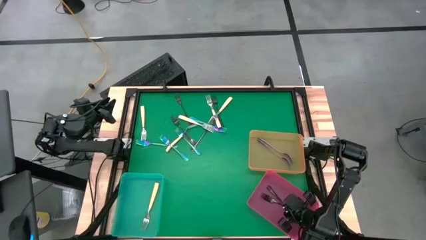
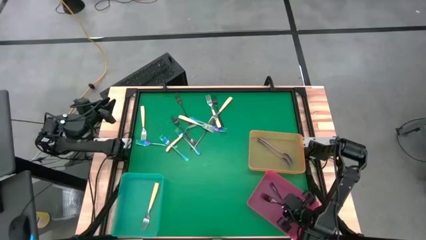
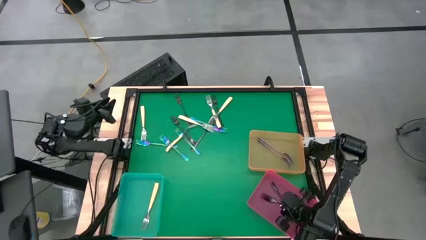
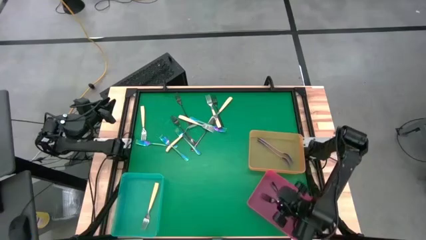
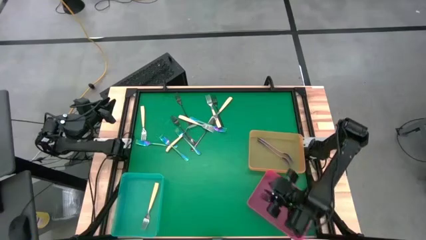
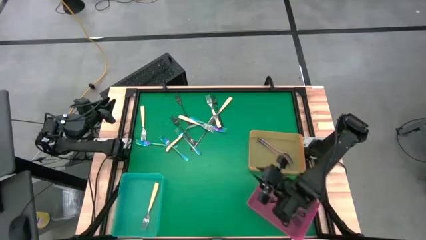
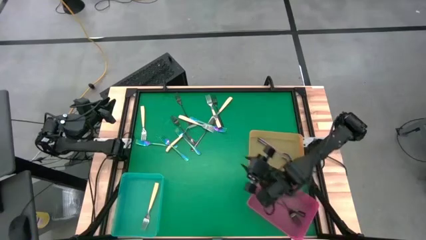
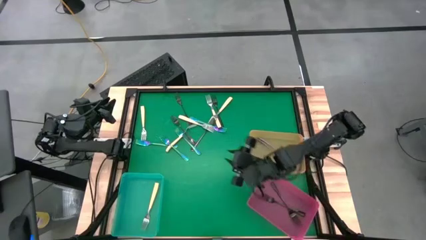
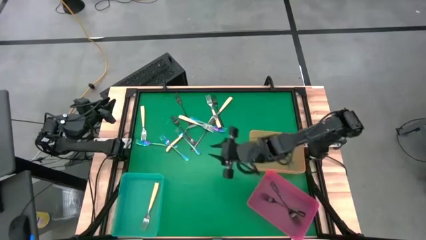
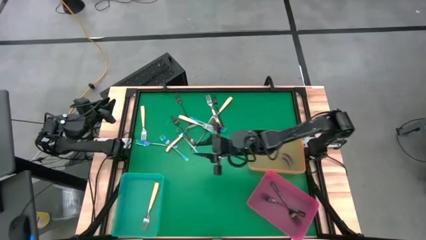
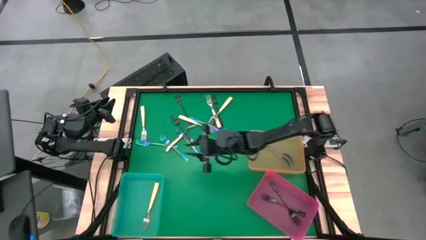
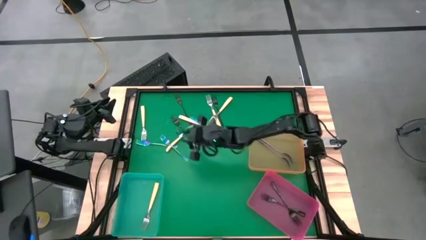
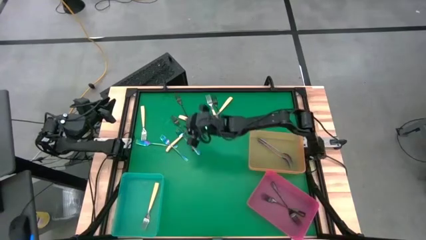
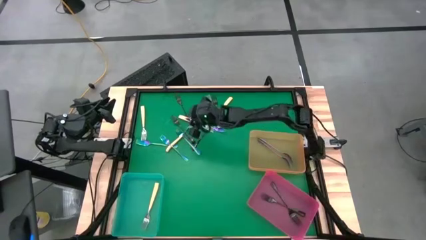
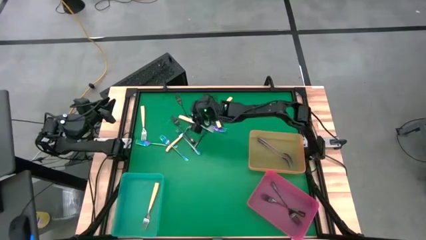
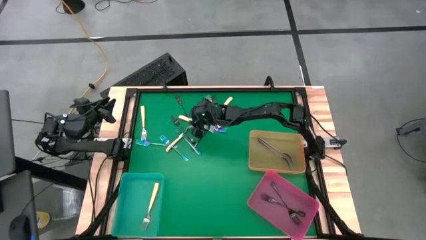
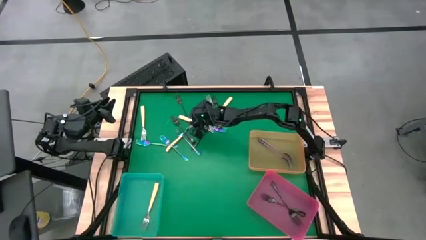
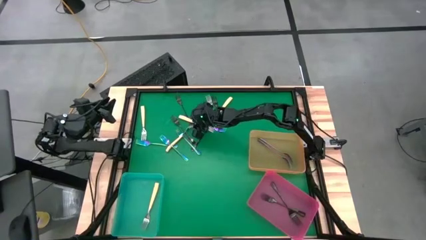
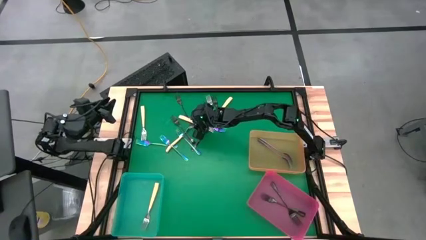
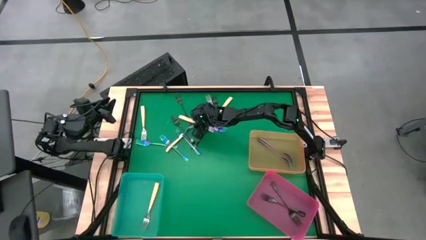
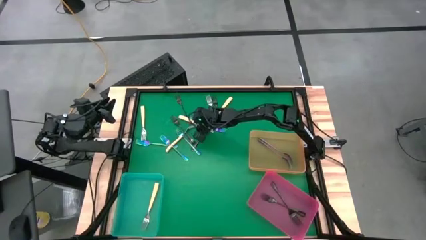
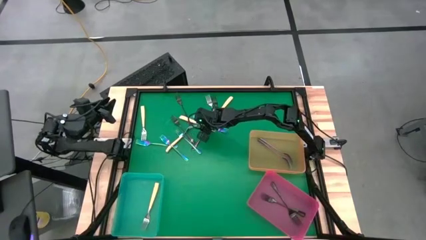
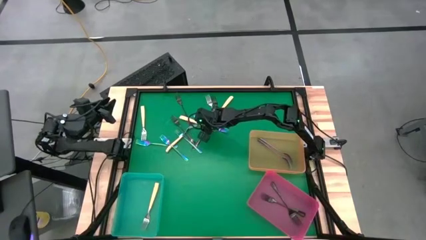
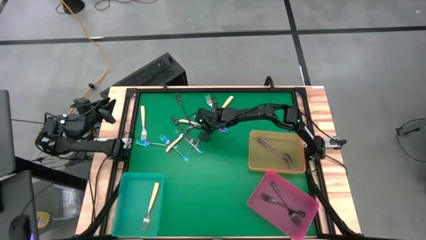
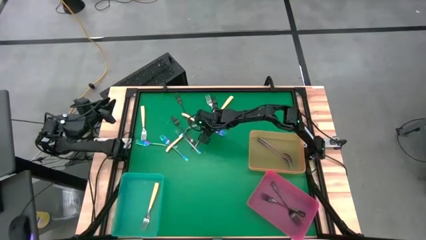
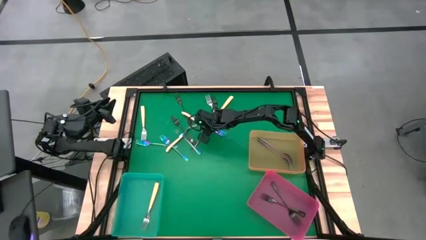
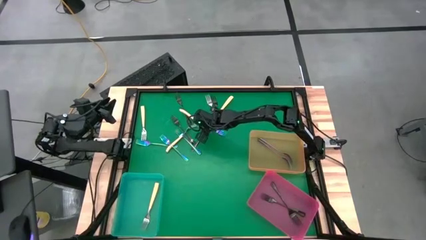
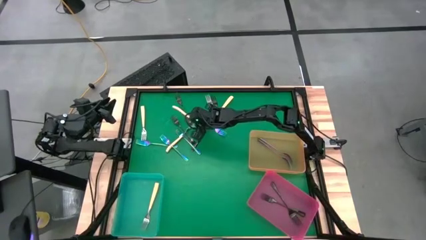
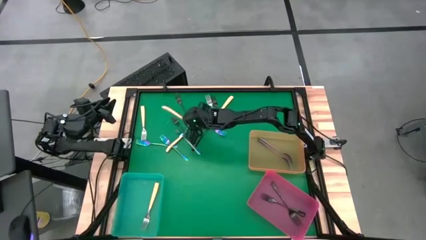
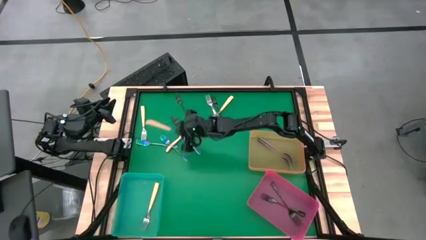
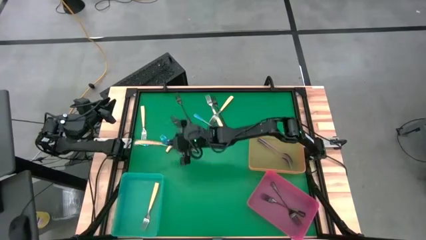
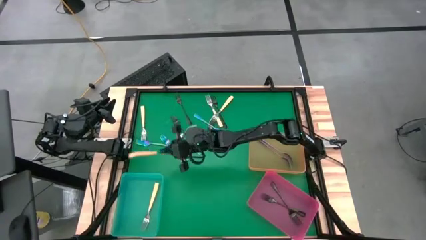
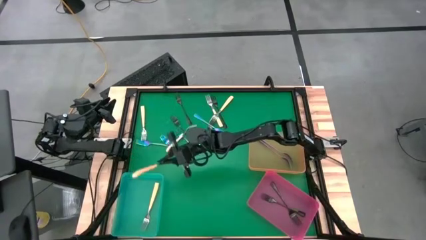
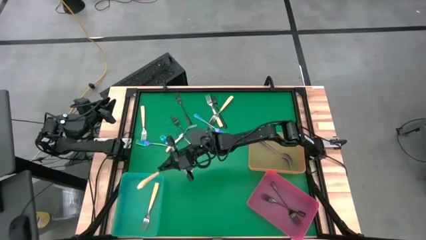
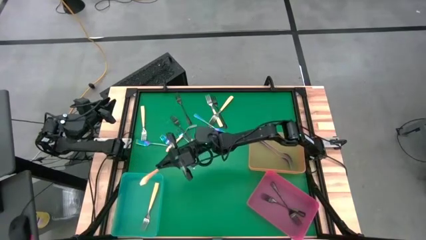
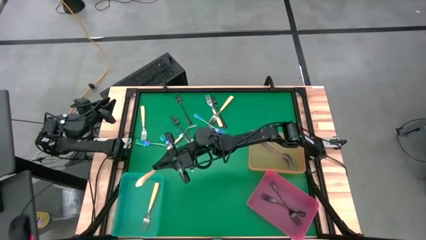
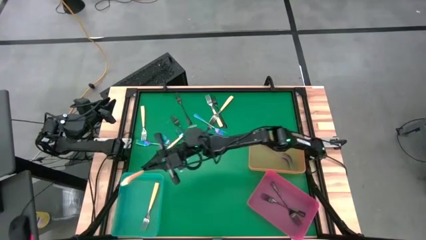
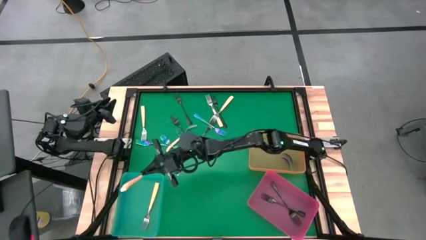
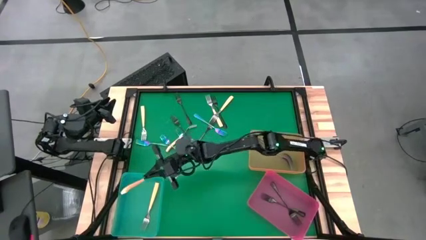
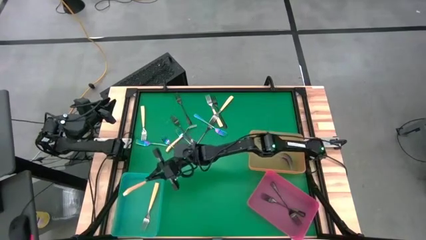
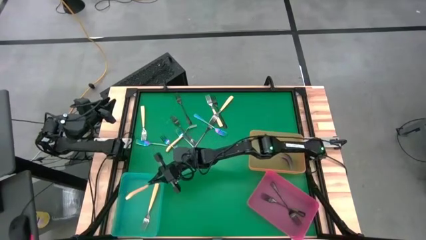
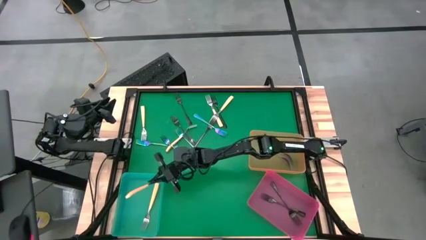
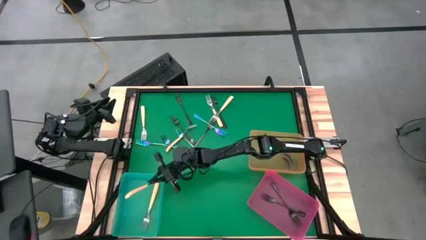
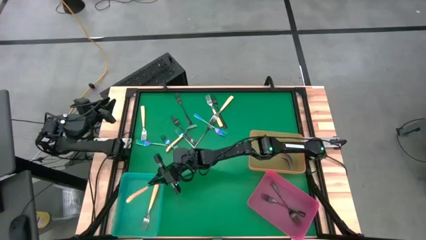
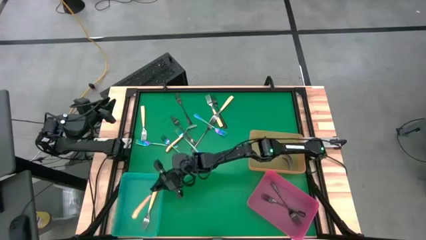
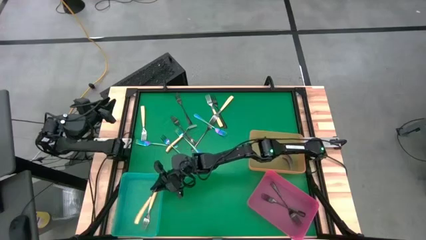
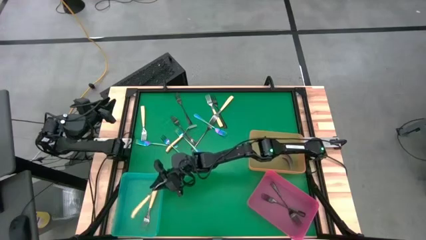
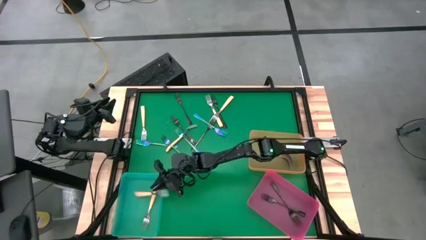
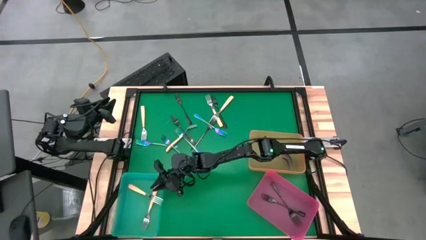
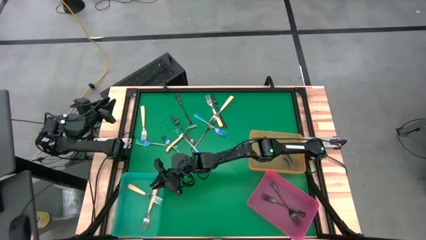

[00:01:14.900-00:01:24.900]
Task: Sort silverware by color (type)
Put the yellow fork into the blue bin

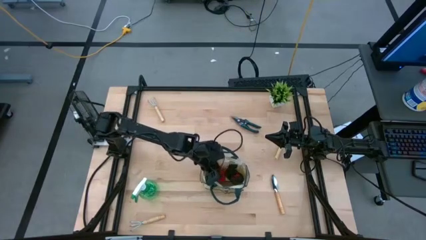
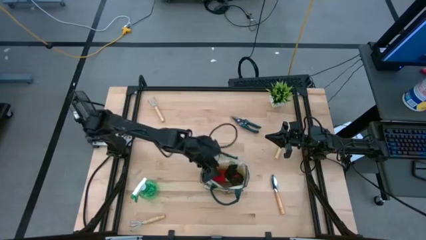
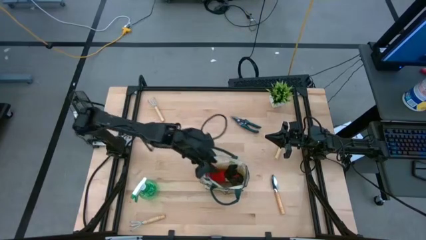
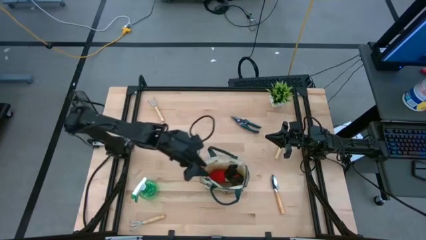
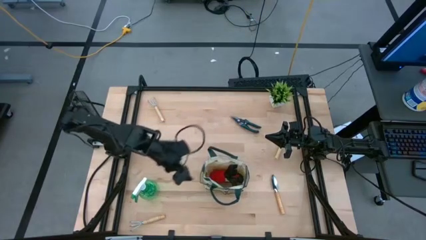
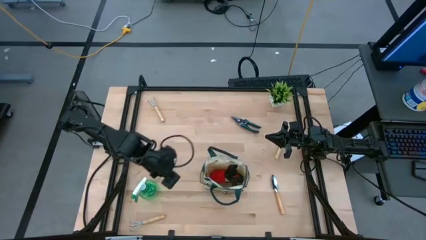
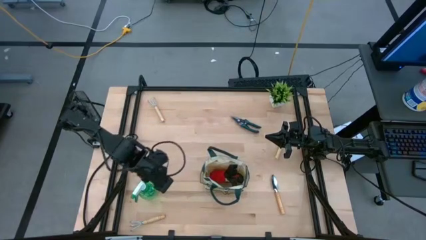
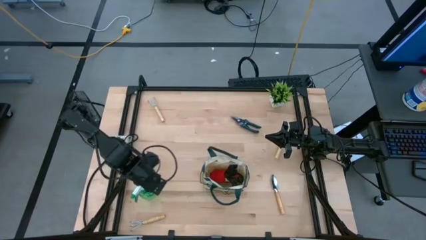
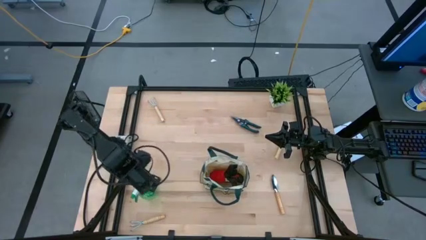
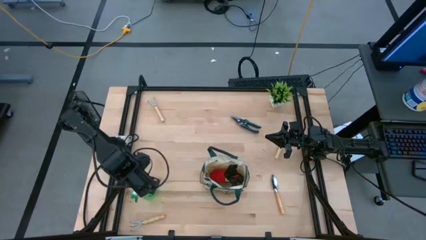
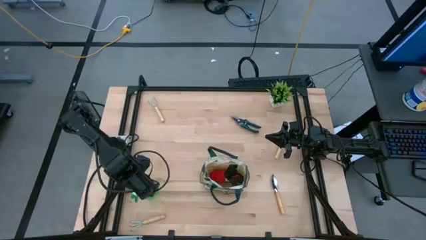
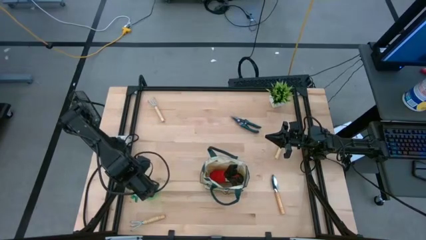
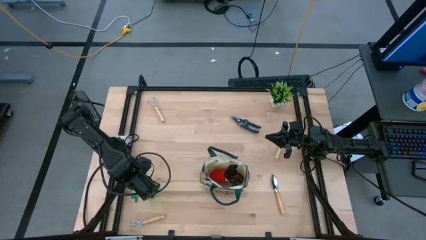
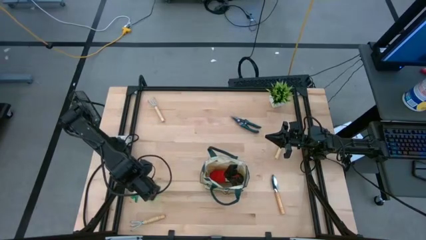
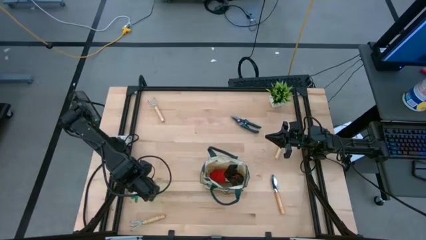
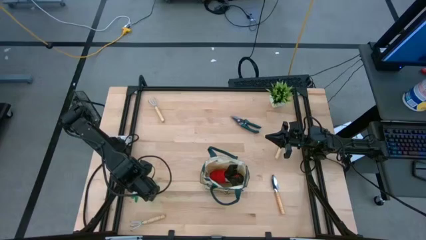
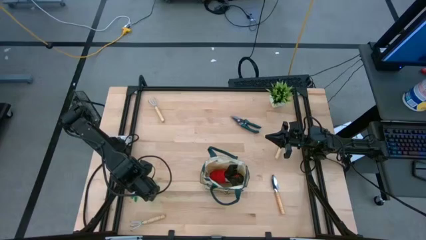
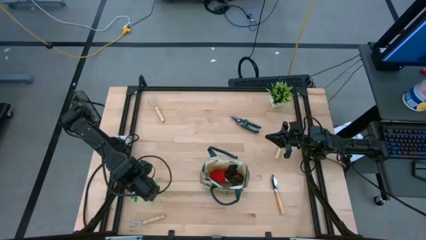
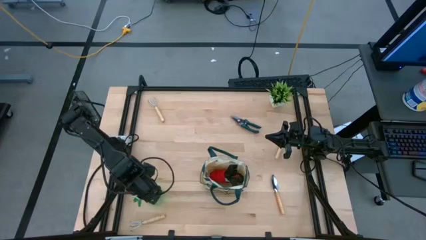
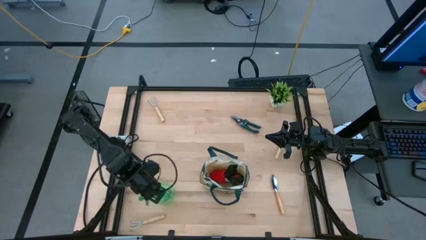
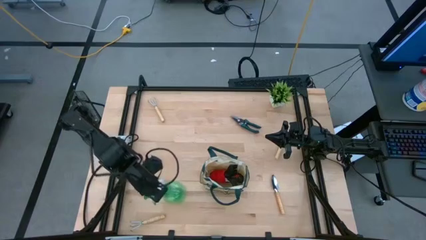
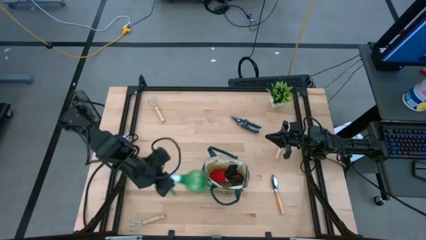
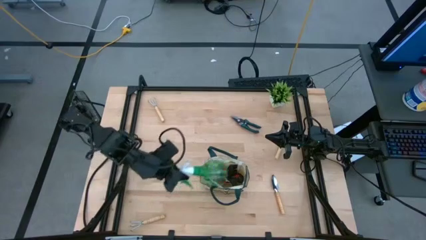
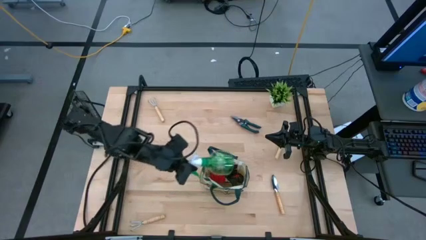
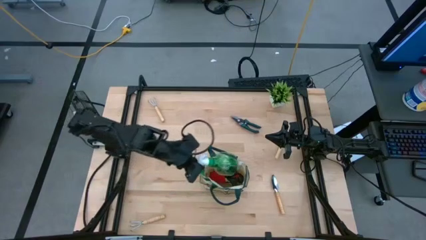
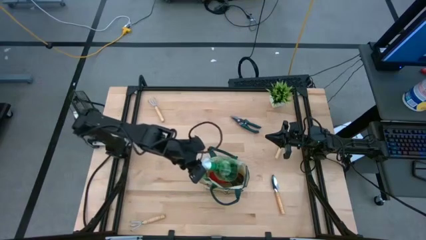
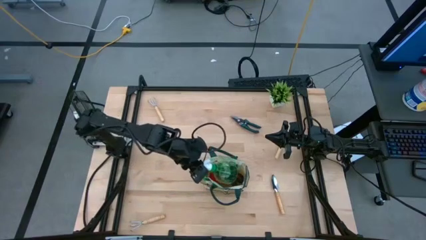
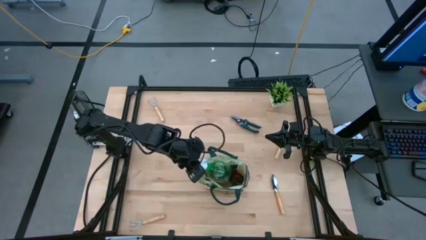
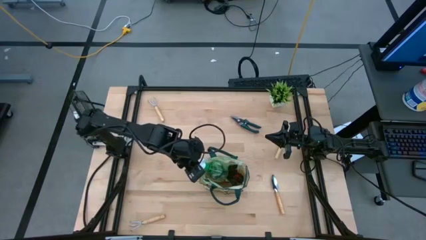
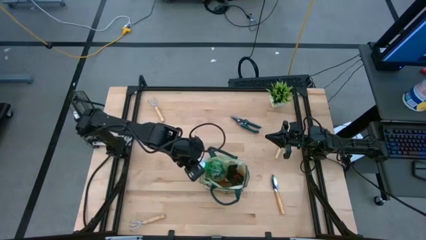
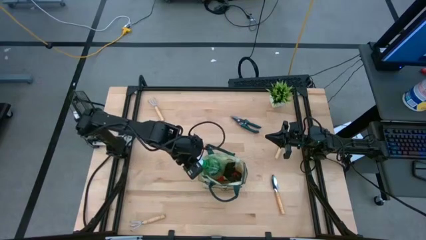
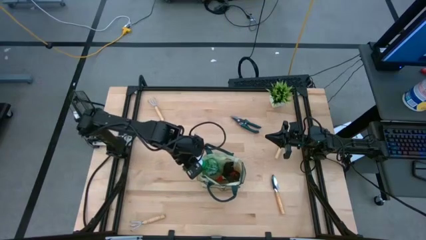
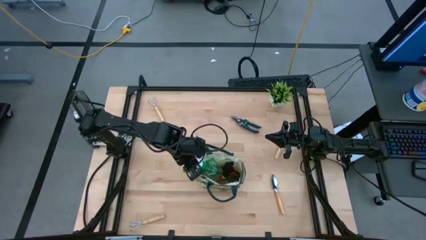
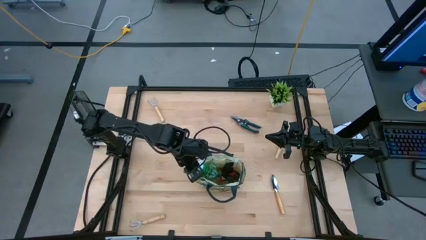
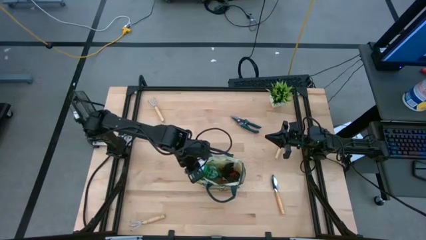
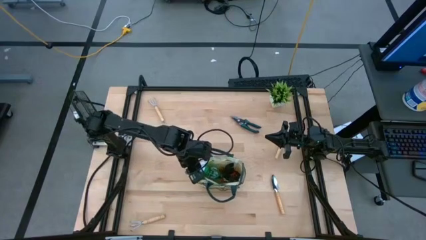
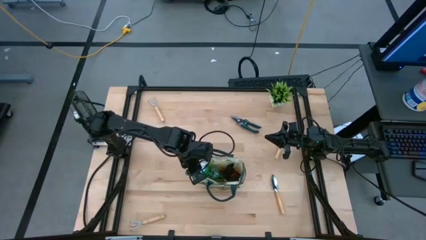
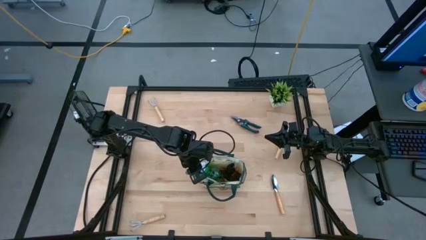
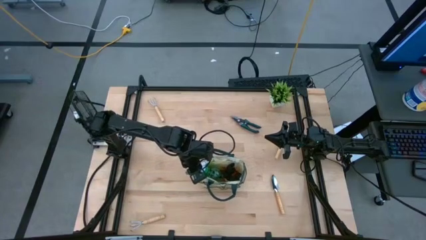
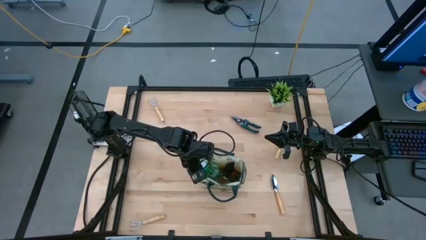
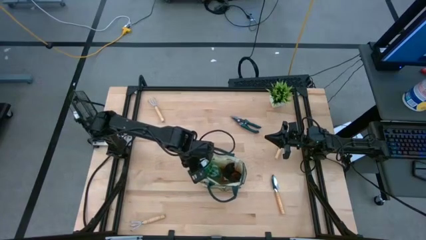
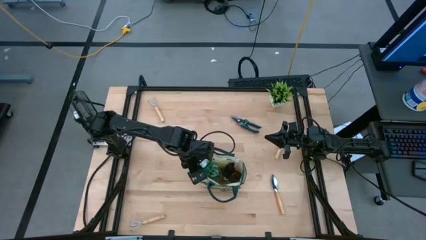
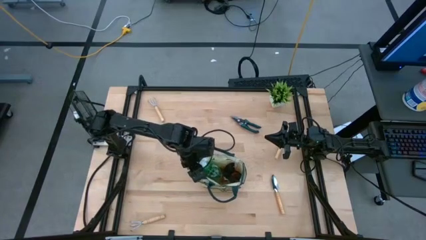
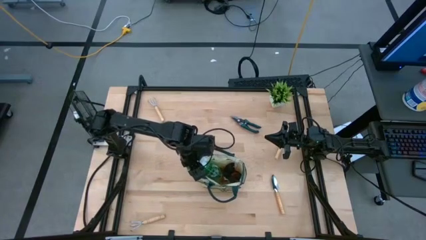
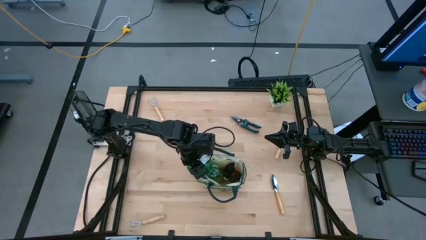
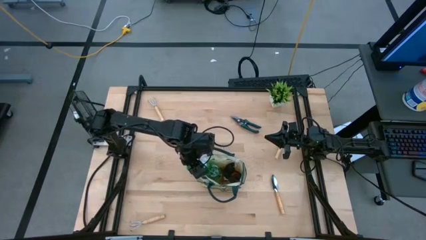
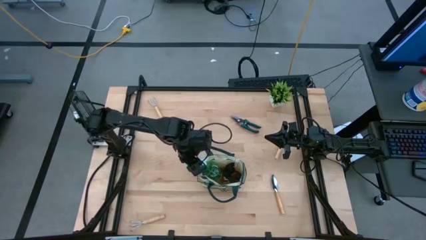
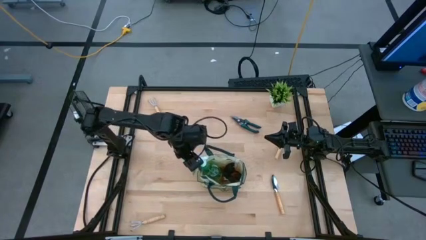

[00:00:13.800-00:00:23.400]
Task: Pick & Place Garden tools in Gardening bag
Put the green spray bottle into the gardening bag
